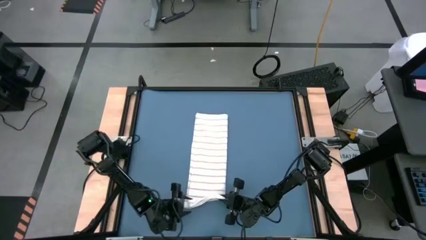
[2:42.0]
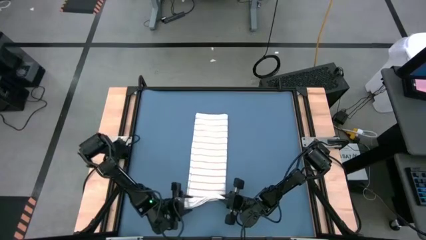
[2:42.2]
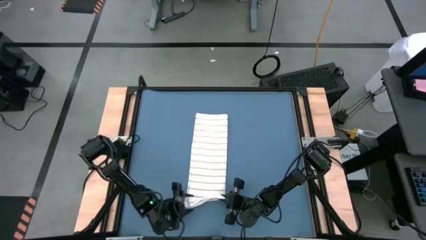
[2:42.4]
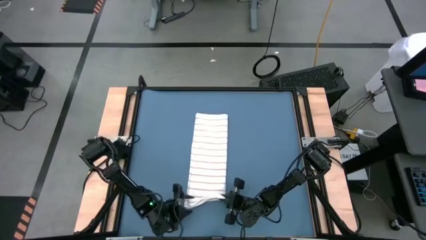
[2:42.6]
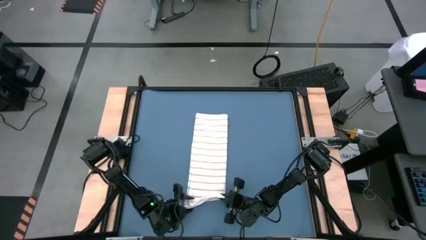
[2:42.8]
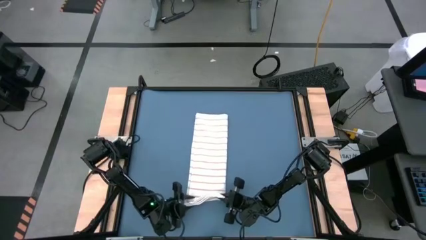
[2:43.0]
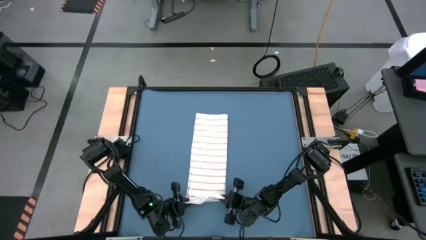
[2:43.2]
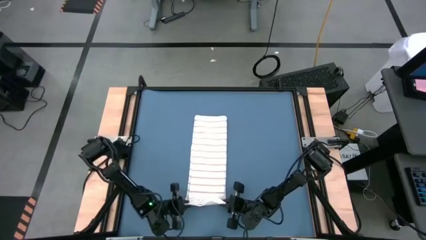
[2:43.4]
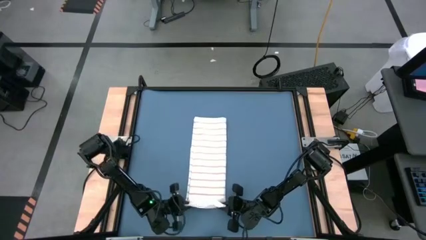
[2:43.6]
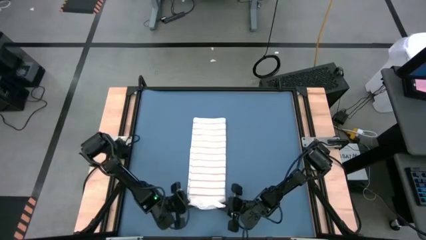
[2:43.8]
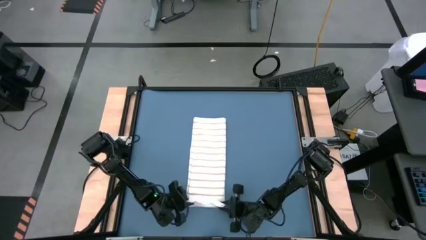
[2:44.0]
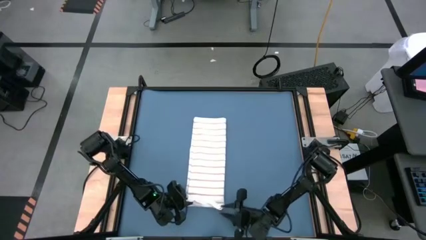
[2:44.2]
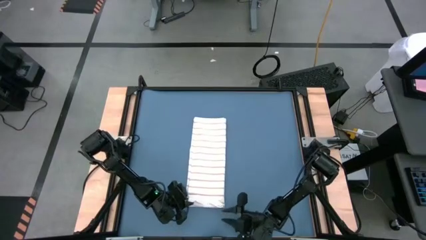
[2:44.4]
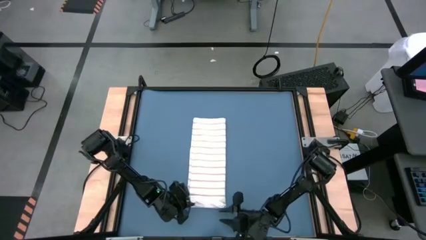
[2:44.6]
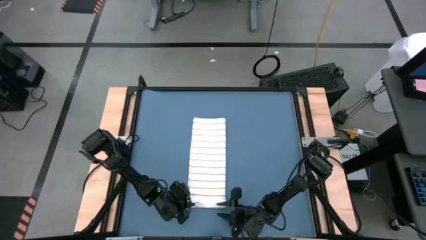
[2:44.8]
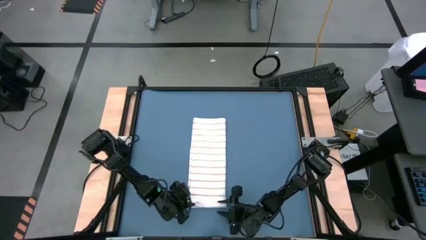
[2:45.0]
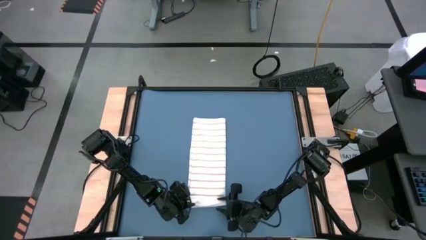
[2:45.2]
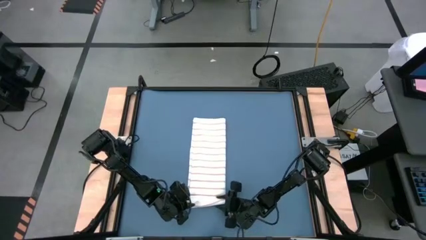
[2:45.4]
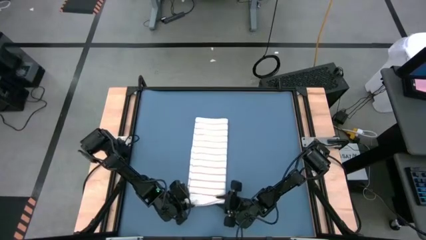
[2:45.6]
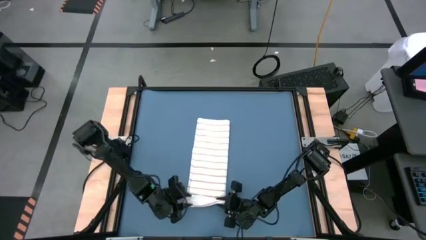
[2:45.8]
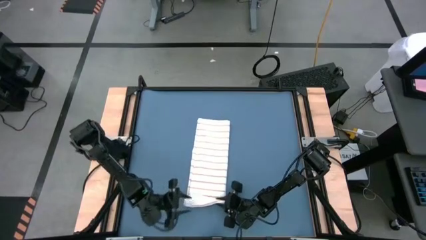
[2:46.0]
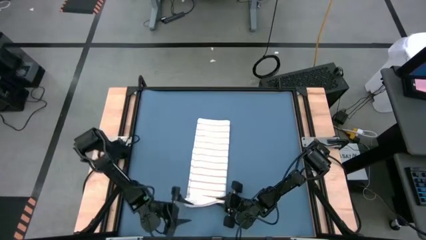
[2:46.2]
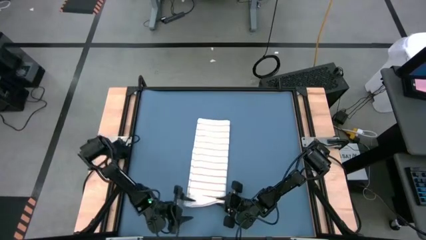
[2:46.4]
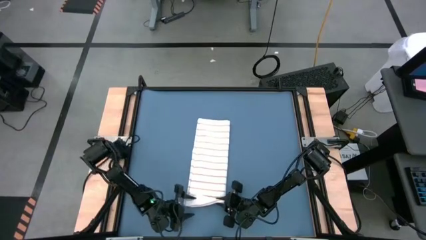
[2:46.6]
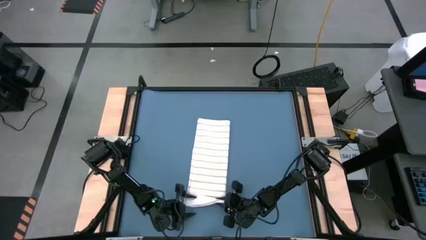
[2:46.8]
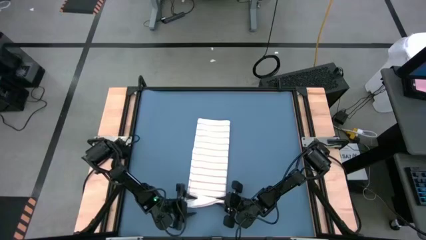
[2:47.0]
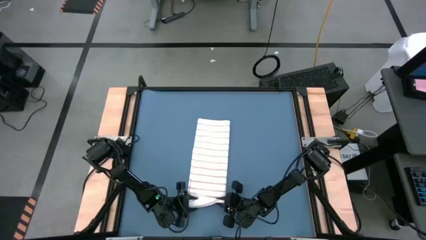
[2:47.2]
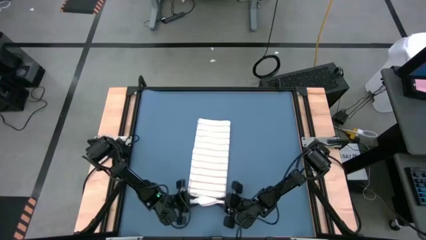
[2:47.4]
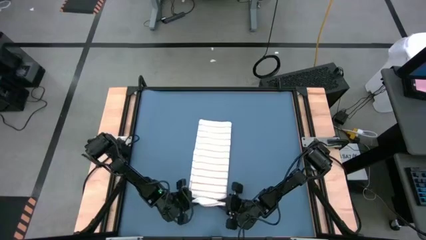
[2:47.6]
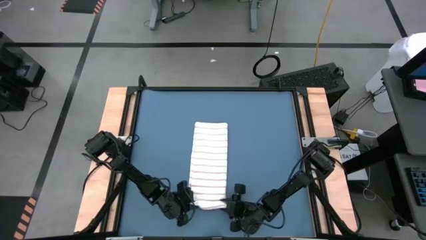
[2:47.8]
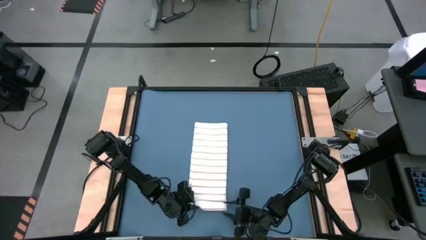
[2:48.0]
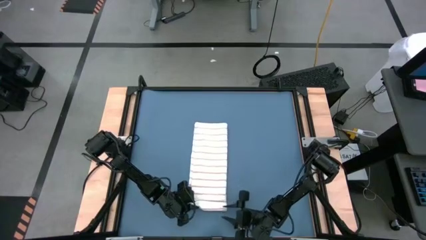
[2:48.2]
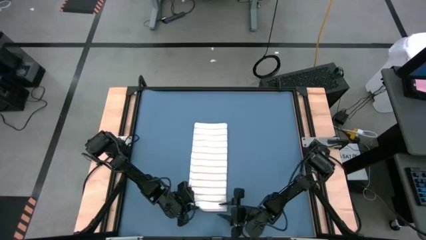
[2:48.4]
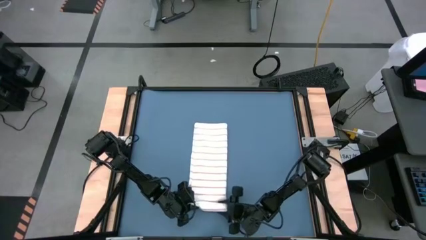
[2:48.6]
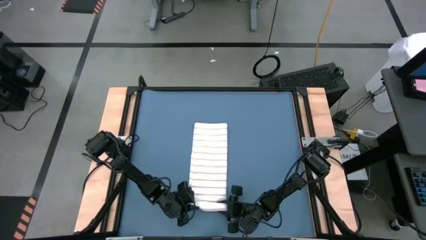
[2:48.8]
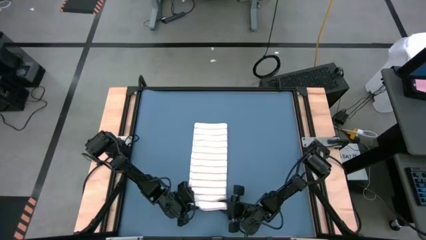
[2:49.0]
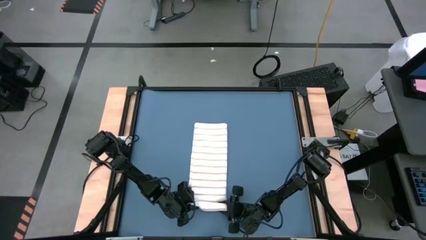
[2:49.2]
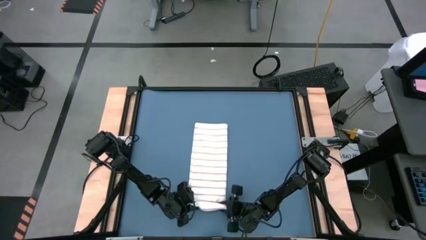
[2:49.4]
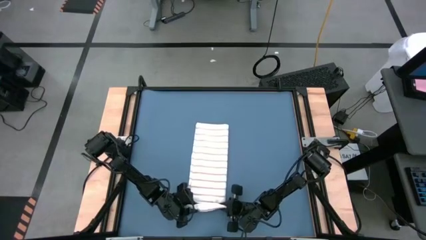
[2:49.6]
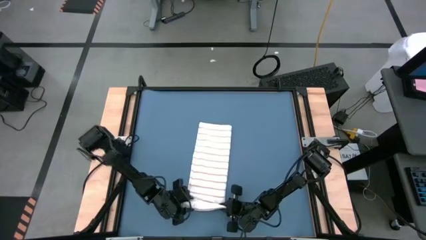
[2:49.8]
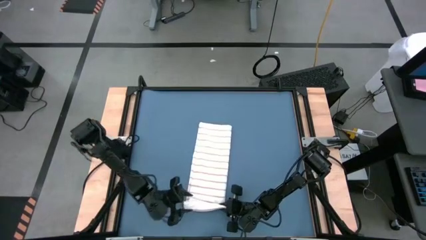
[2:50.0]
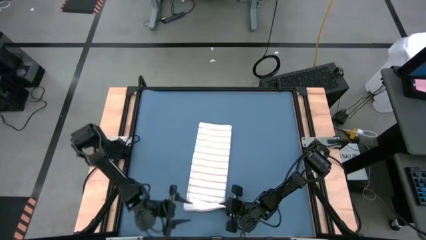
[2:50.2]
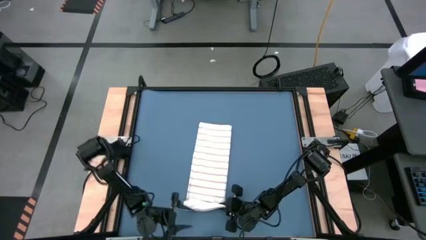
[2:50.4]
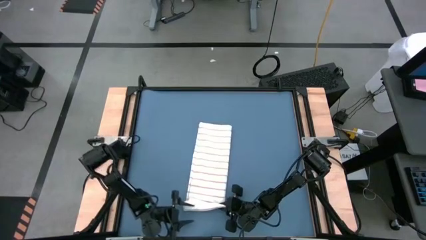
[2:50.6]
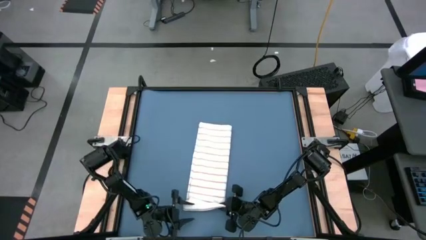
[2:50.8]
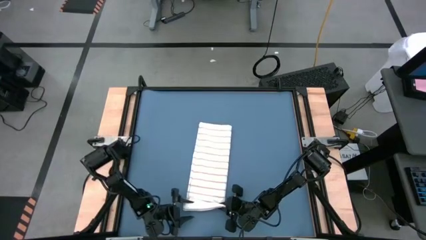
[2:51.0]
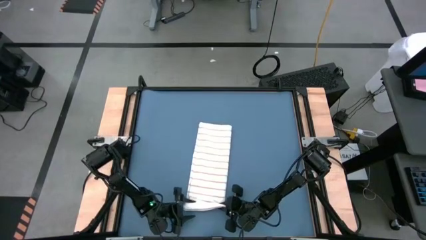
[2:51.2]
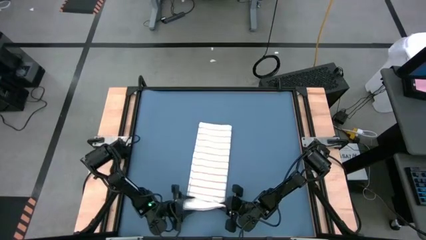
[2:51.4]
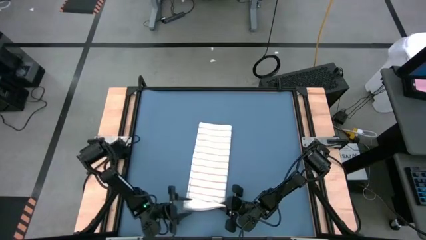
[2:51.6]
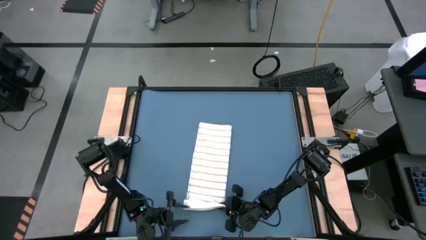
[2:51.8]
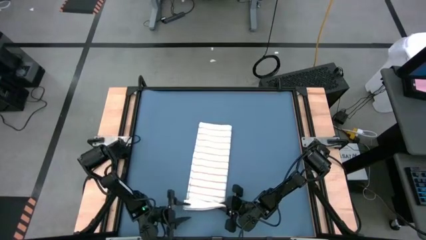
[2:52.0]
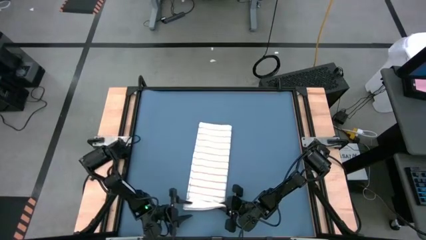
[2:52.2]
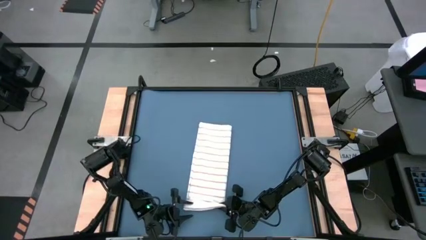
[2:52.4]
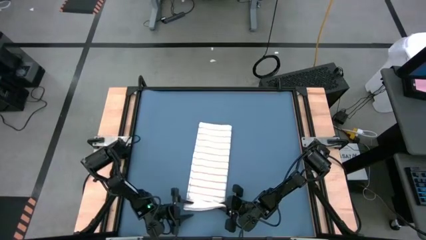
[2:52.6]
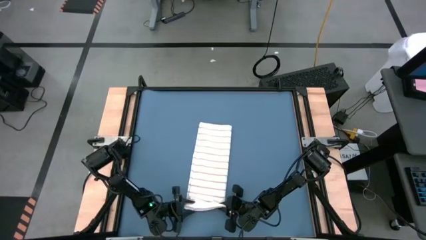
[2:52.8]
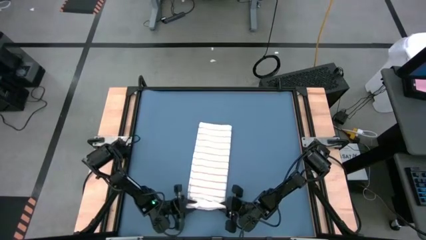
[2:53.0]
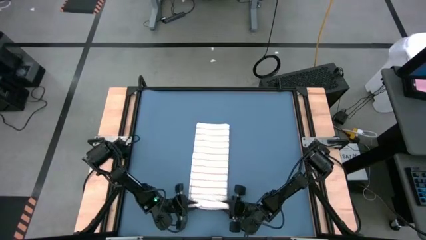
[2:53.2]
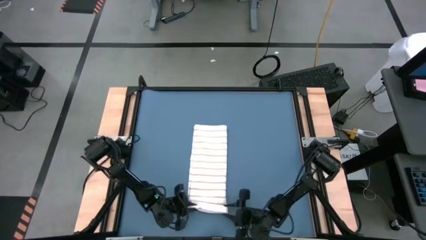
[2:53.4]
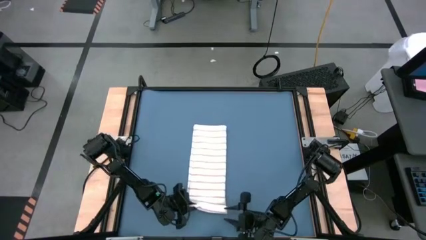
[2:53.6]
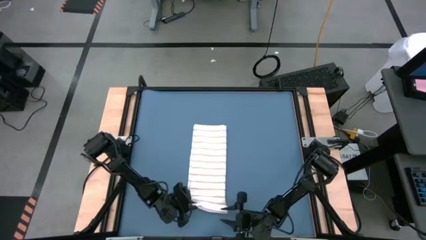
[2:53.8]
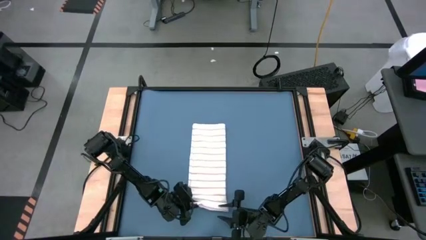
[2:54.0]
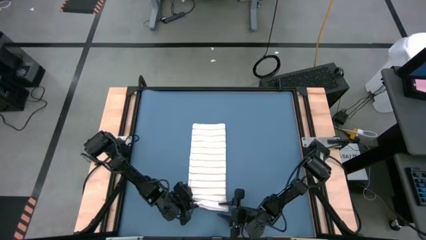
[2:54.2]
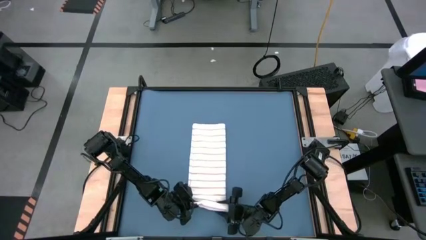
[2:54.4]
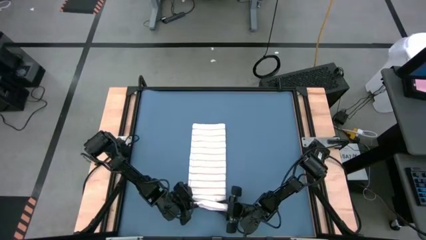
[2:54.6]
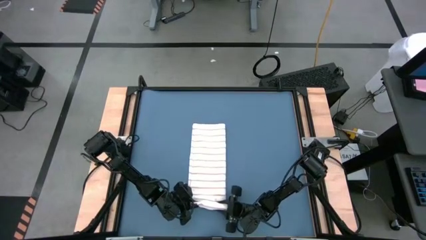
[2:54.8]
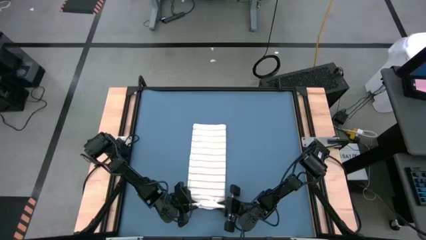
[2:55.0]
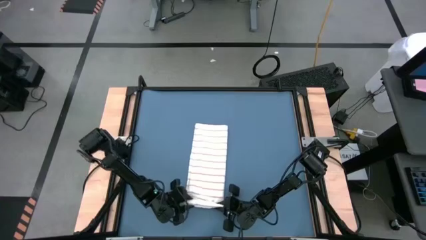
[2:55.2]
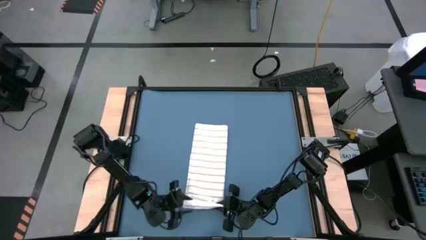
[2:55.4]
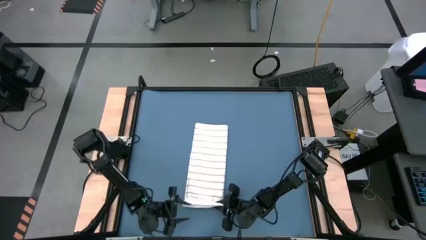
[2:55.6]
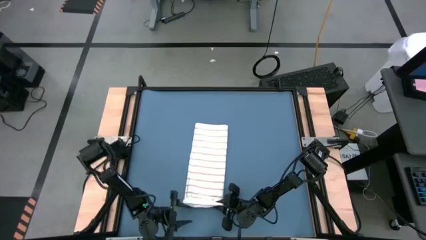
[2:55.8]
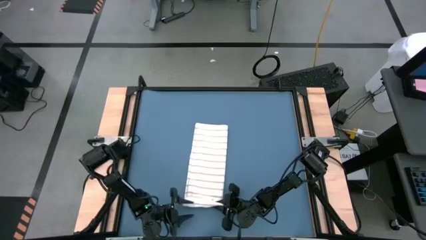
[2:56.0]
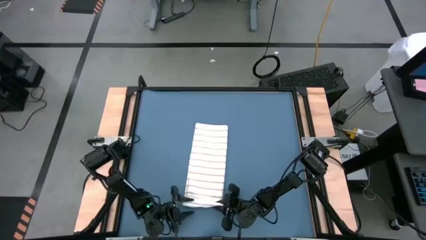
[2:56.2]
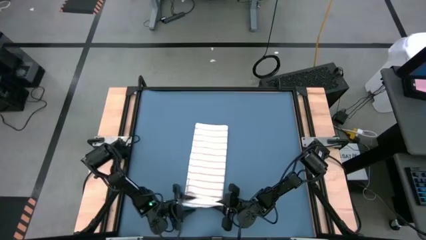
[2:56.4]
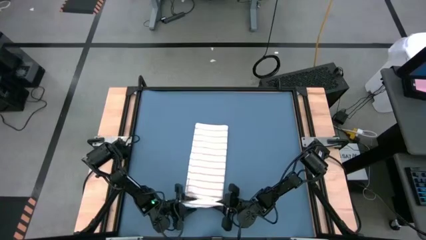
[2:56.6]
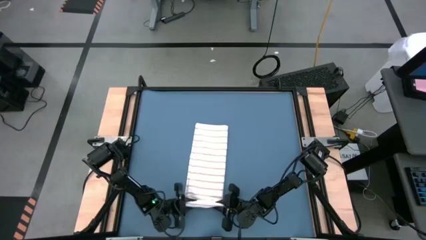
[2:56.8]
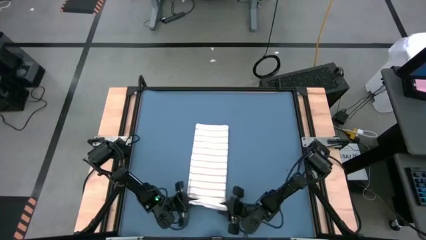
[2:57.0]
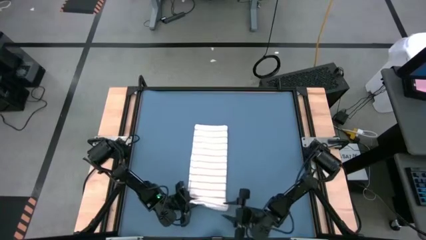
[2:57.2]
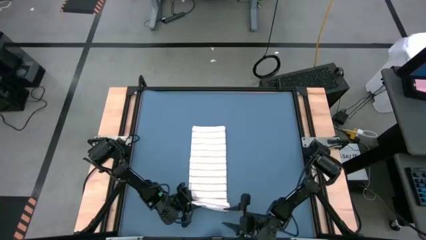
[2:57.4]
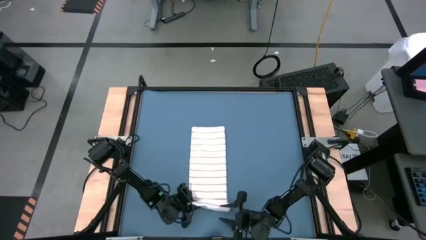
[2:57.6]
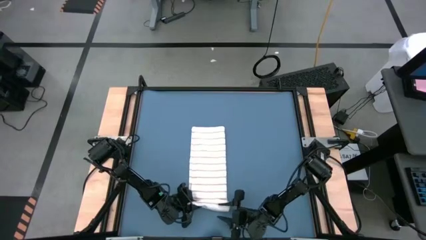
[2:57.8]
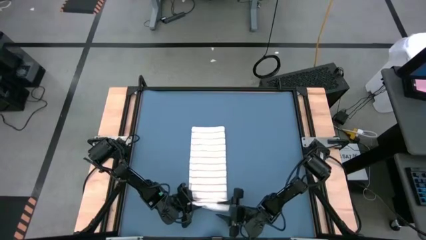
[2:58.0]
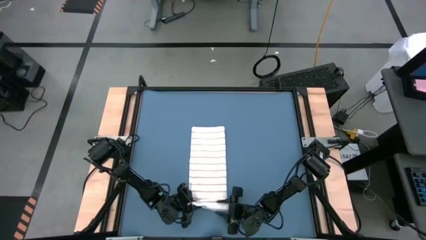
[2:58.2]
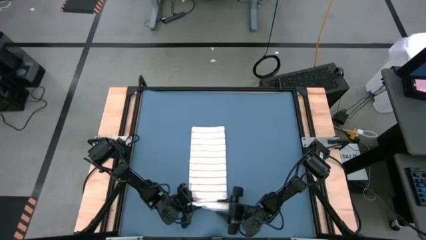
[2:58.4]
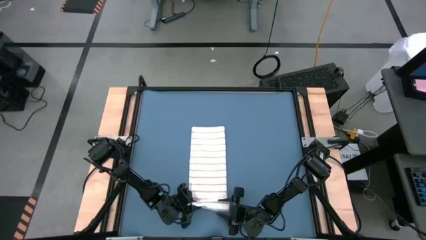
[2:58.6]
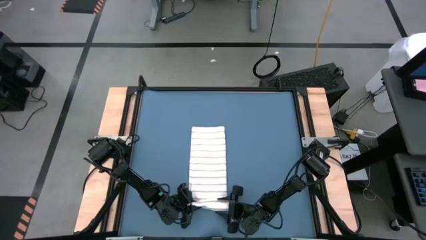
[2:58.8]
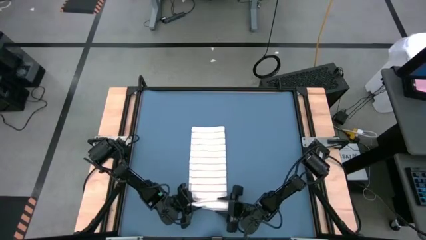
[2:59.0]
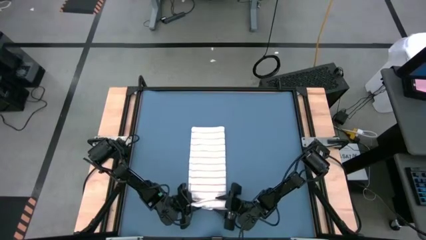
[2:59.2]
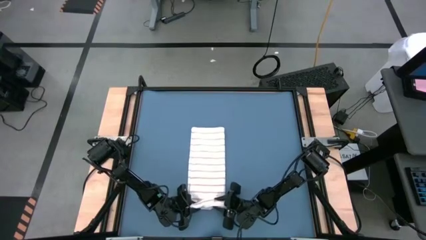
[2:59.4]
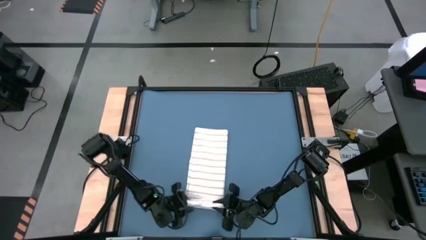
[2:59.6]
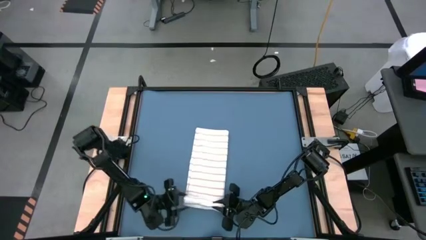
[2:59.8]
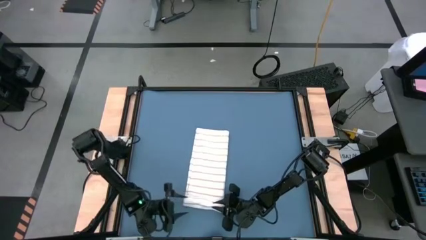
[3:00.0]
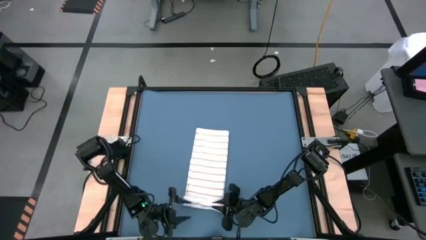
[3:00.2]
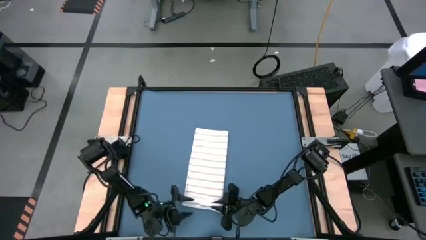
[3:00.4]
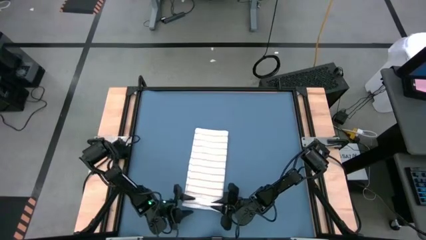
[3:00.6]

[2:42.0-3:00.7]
Task: Roll towel
Roll the white towel
